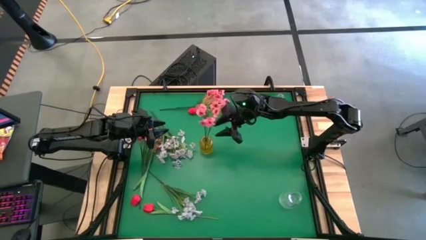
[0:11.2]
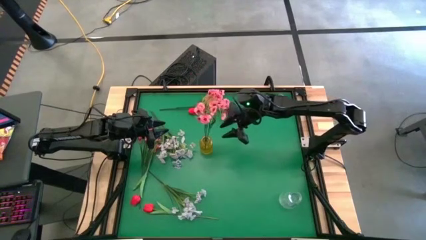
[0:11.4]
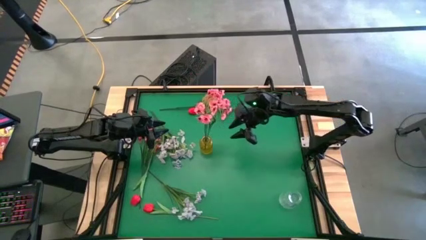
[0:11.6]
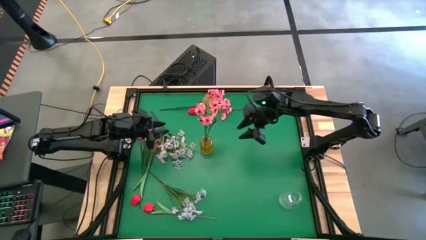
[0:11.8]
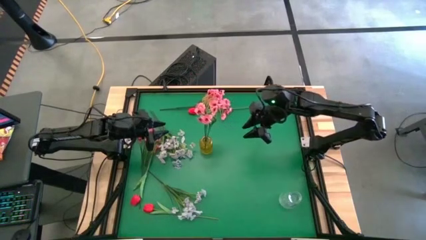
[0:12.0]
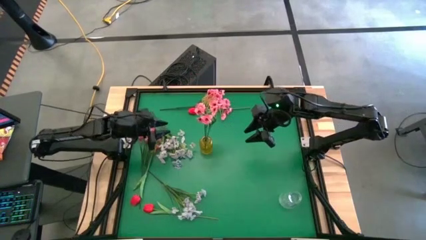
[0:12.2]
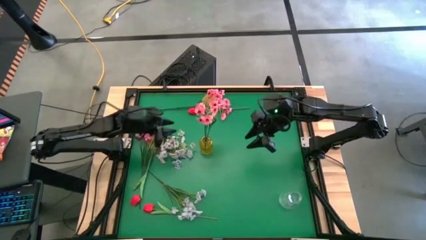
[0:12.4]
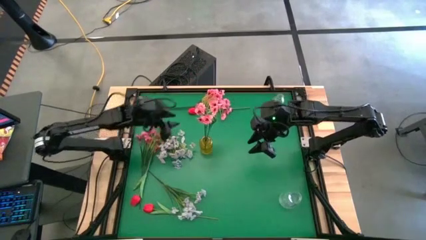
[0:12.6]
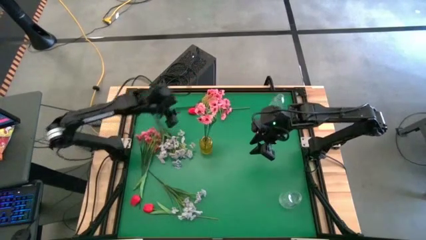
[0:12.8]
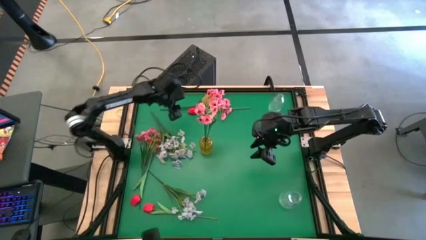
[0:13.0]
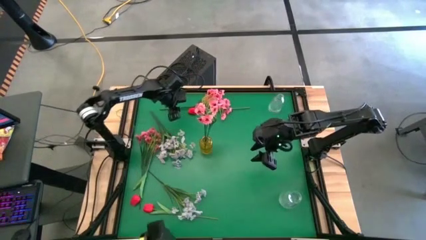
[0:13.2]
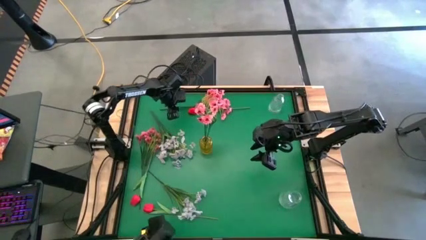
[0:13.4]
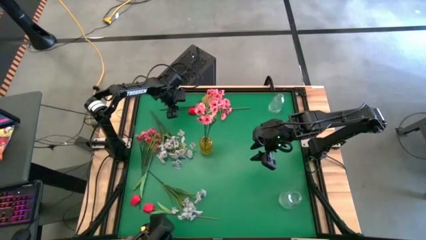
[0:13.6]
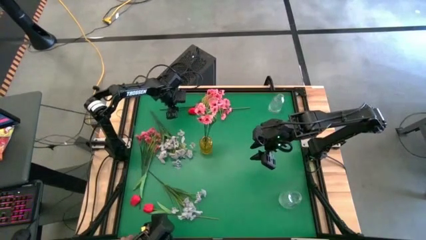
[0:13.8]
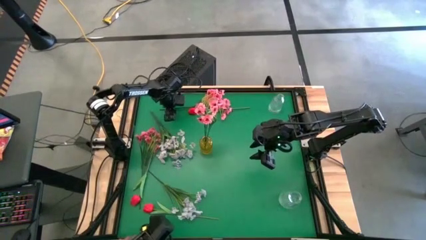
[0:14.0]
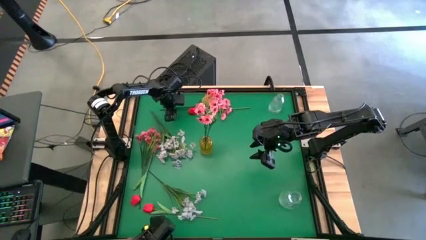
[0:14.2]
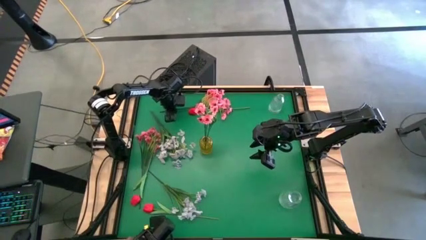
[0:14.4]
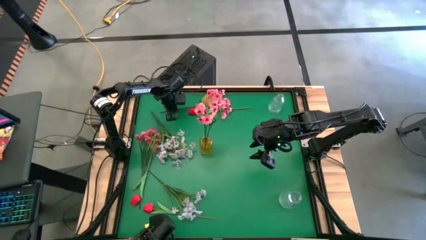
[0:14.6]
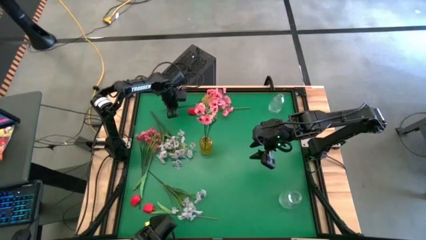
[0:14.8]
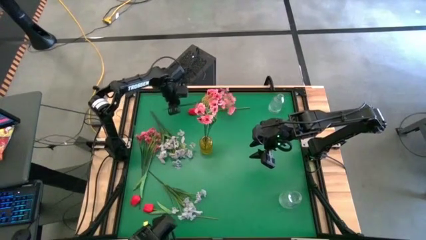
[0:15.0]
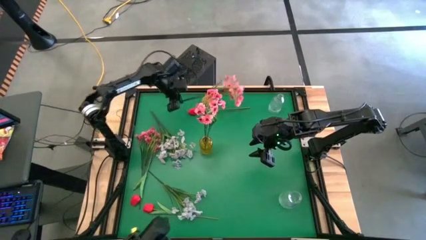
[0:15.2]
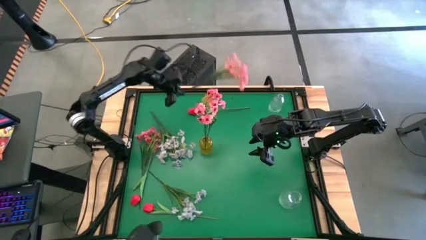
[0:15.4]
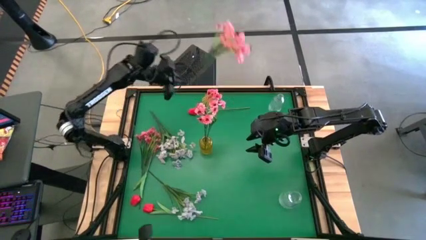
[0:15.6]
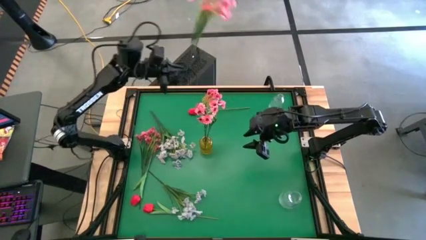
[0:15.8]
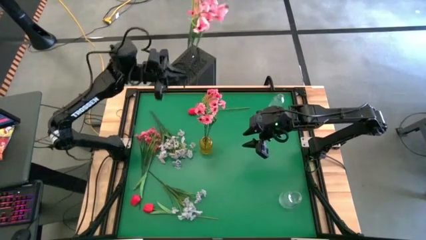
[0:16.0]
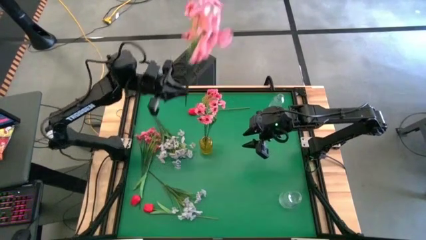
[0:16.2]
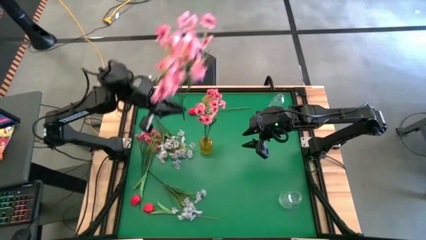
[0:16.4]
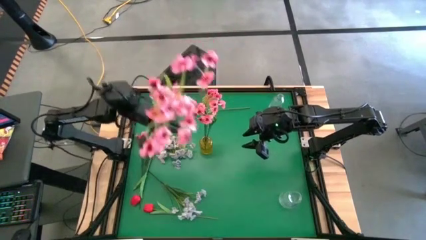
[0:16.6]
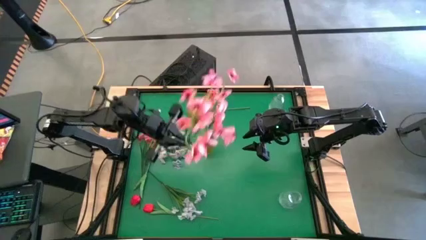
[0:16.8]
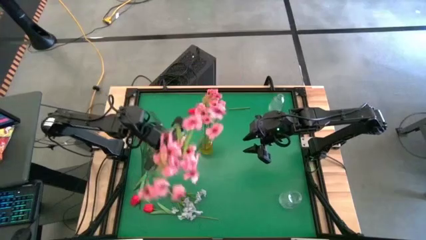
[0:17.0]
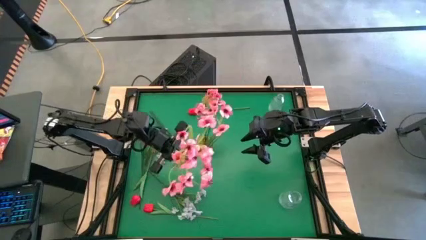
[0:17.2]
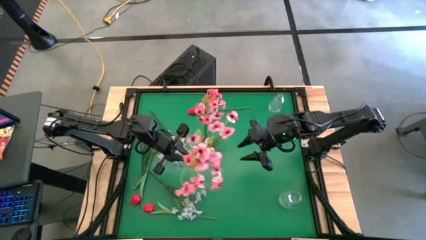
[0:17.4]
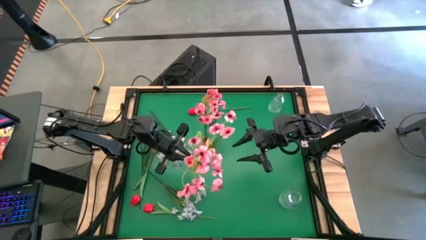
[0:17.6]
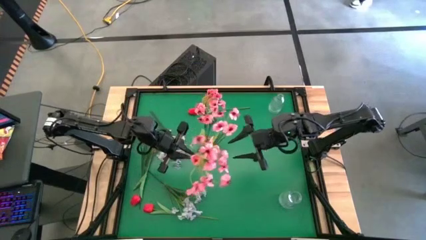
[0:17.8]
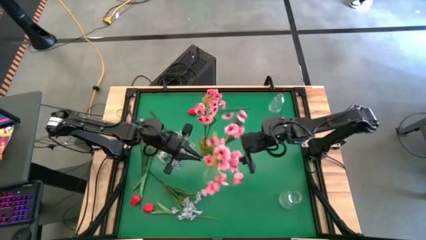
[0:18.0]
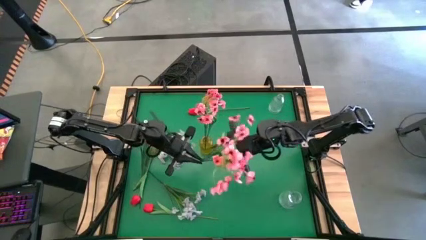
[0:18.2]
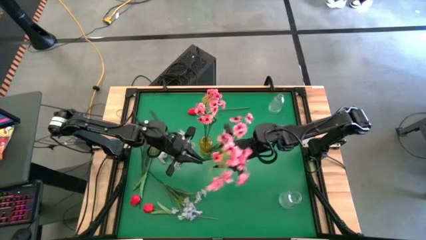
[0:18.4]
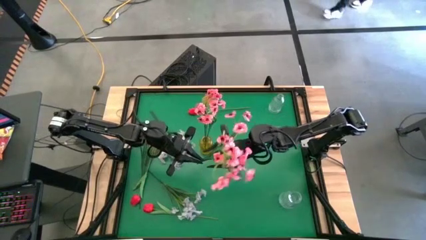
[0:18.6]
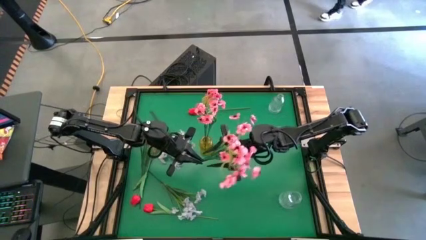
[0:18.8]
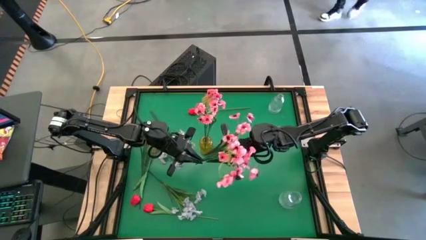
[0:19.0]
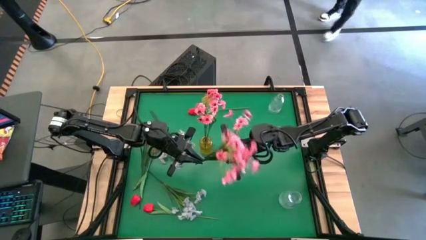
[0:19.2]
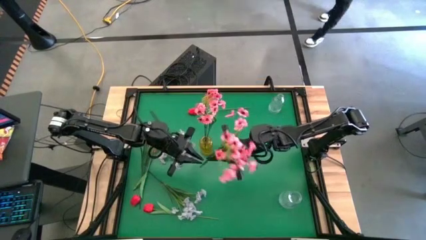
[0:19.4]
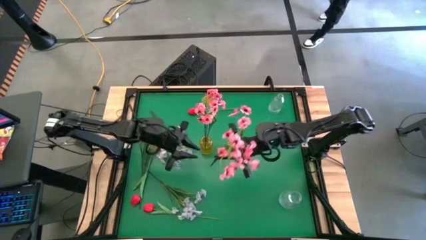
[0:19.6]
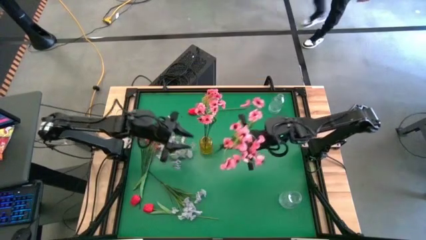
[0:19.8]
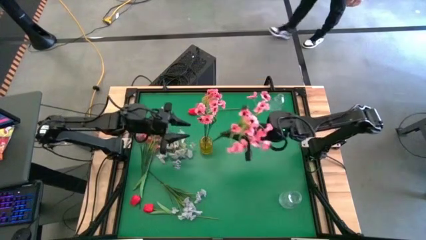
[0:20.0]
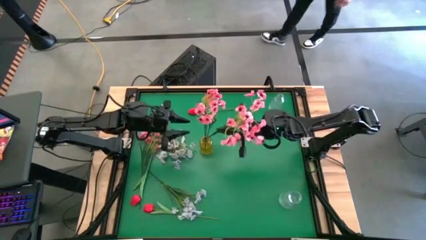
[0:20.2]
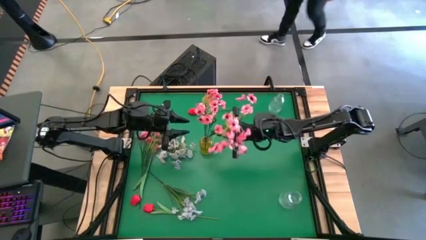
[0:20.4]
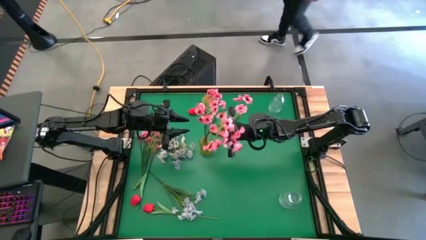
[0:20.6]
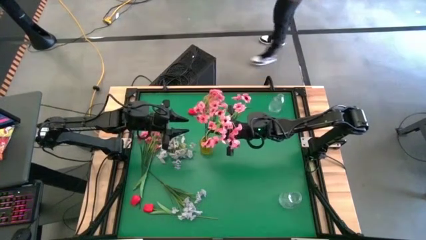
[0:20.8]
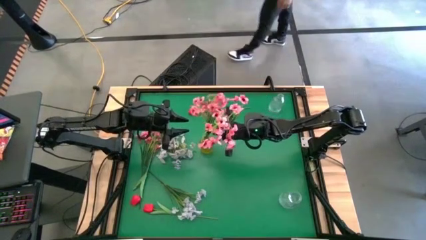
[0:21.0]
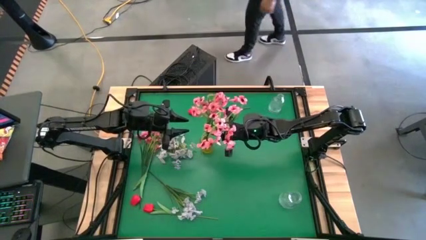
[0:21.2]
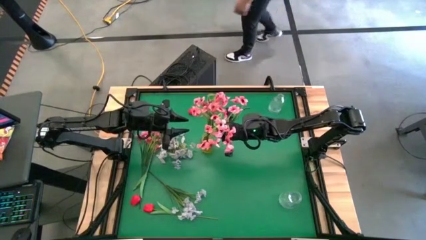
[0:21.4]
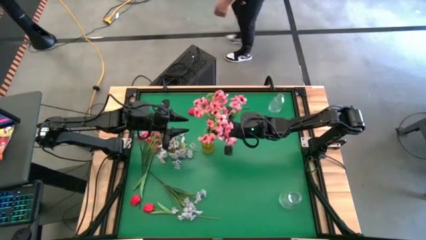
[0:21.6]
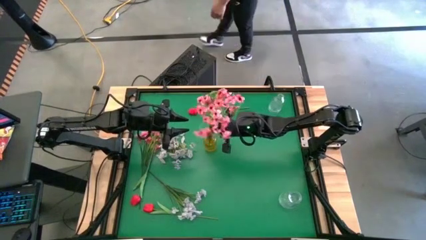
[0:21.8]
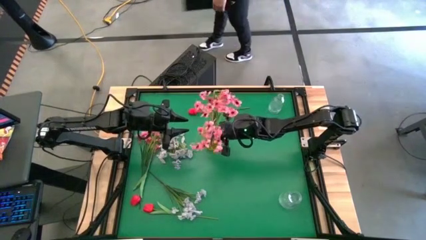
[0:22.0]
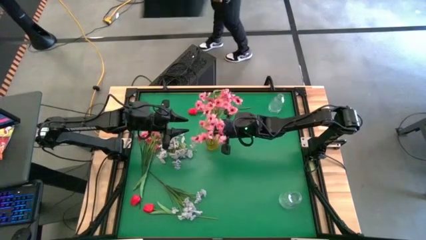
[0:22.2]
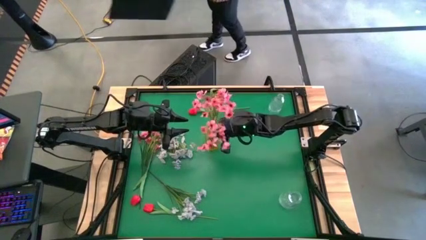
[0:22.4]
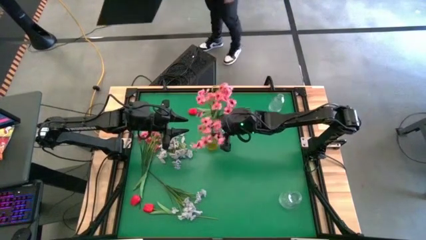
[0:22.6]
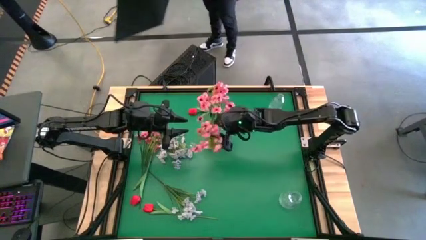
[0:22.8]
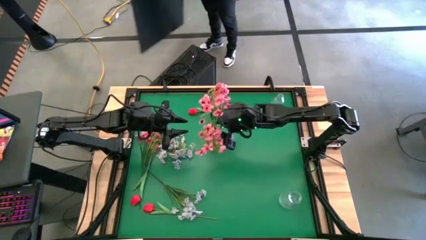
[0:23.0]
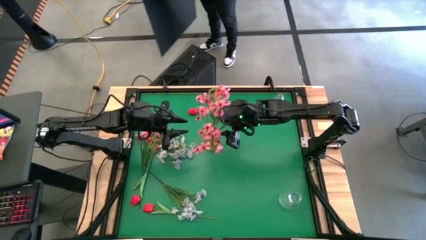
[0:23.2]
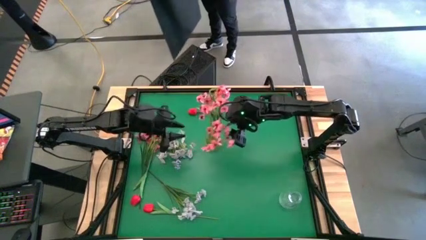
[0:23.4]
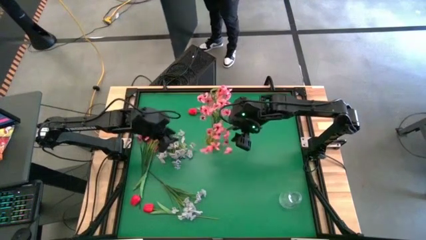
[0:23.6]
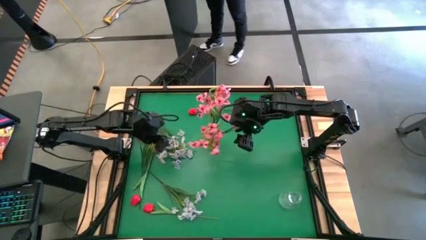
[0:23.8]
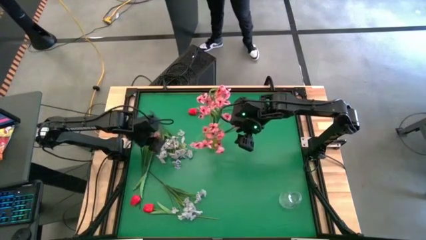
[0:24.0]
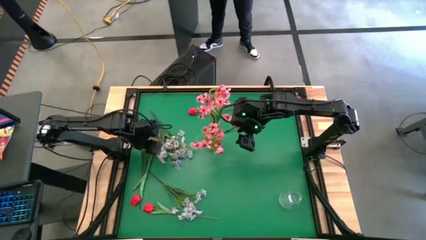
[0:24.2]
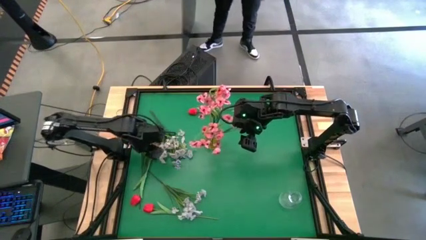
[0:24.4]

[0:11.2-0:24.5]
Task: Sort flowers into vase by color
Put the pink flowers into the yellow vase

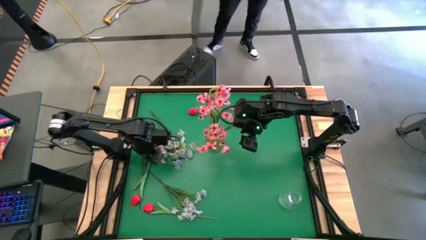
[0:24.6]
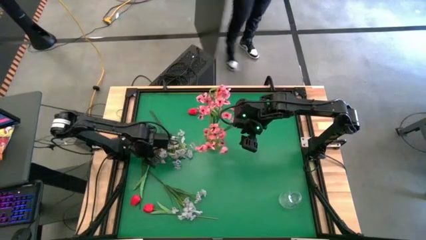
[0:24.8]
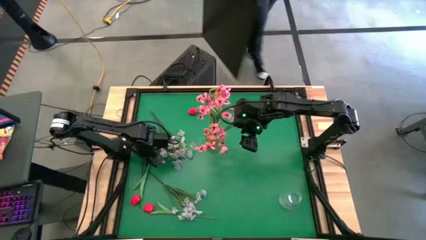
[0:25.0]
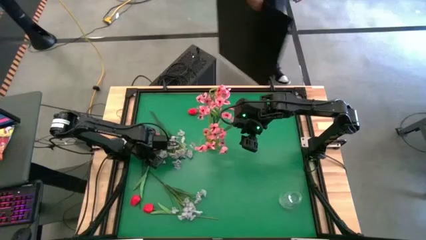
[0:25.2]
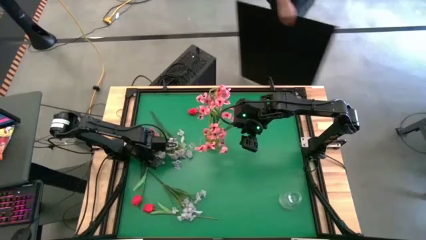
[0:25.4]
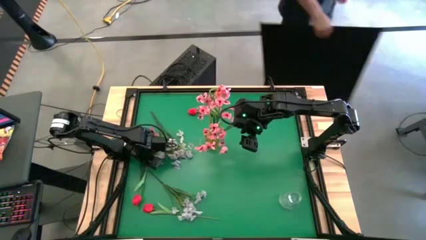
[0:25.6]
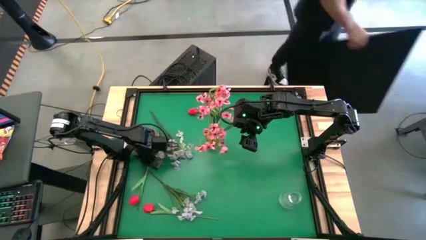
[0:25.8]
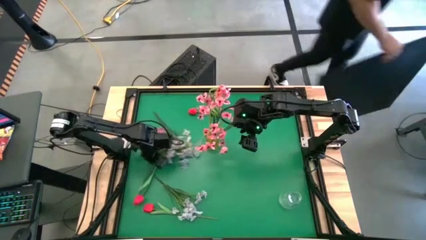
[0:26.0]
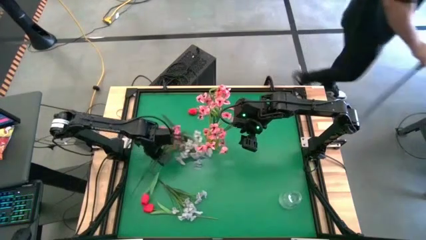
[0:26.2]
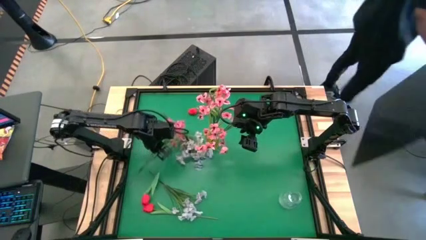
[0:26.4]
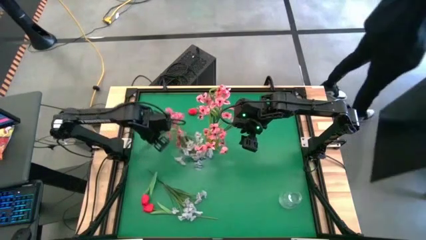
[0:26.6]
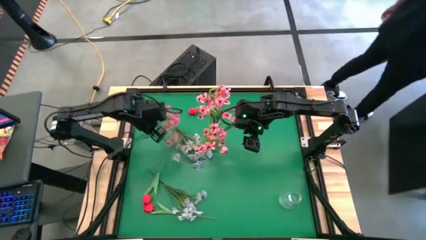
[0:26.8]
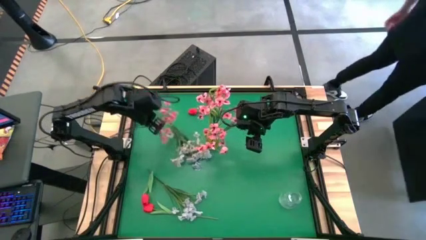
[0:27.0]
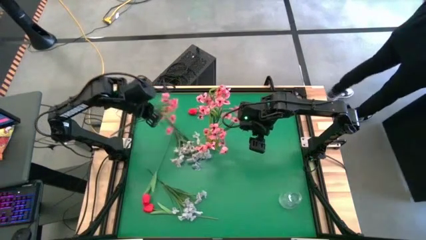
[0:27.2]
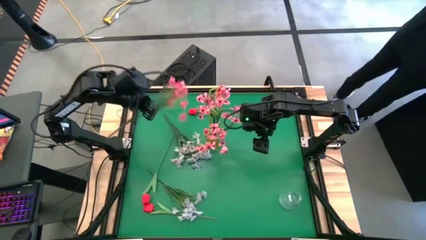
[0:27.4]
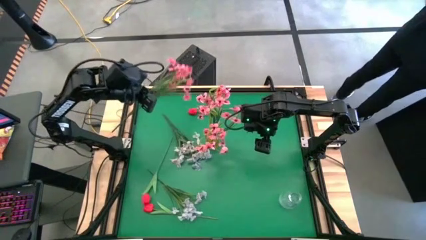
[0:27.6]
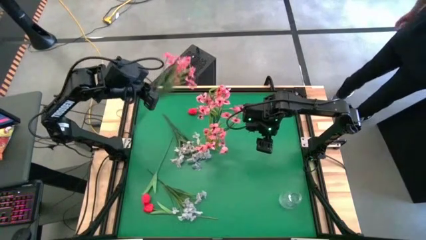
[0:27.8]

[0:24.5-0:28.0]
Put the pink flowers into the yellow vase
